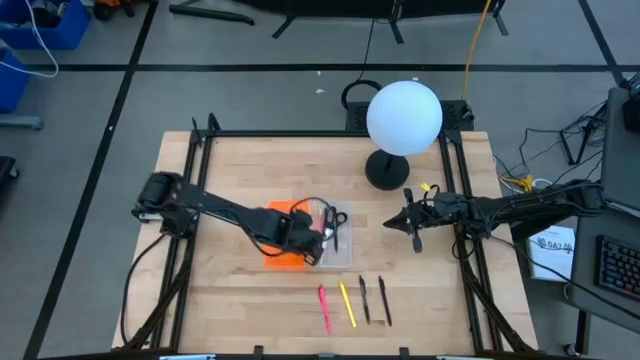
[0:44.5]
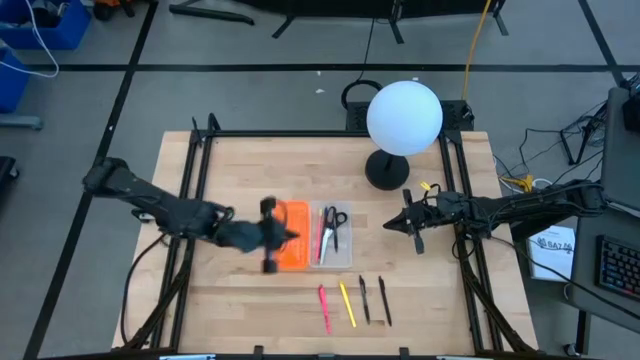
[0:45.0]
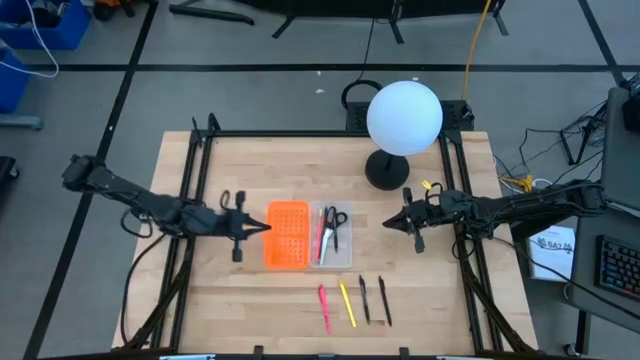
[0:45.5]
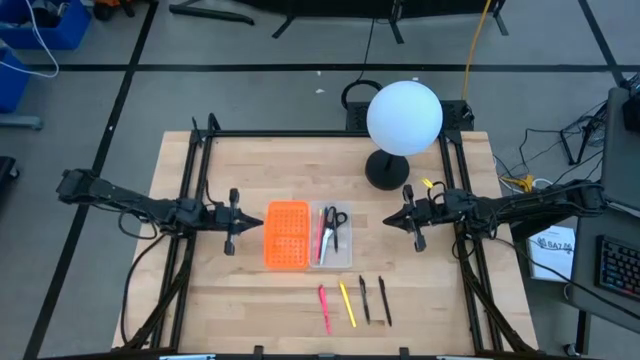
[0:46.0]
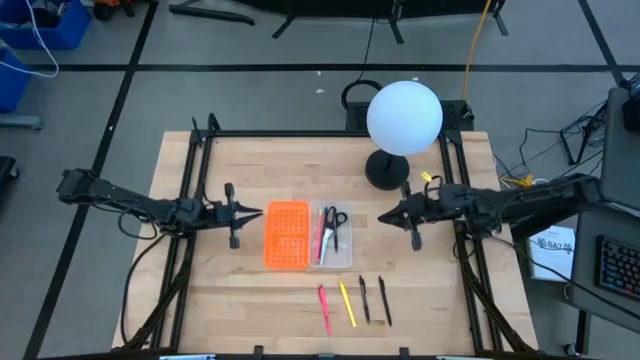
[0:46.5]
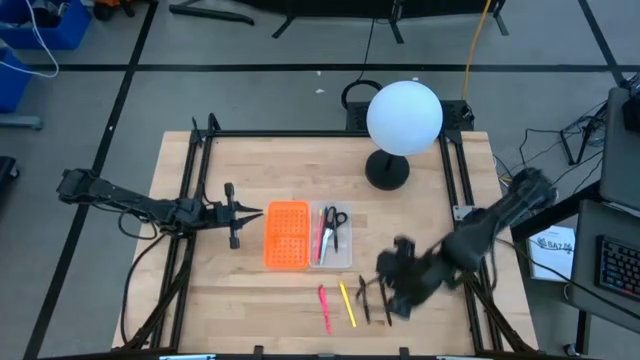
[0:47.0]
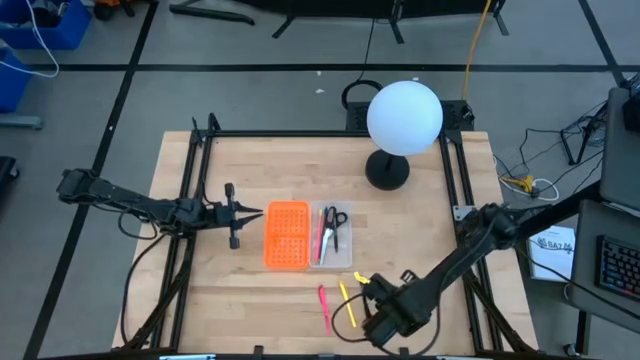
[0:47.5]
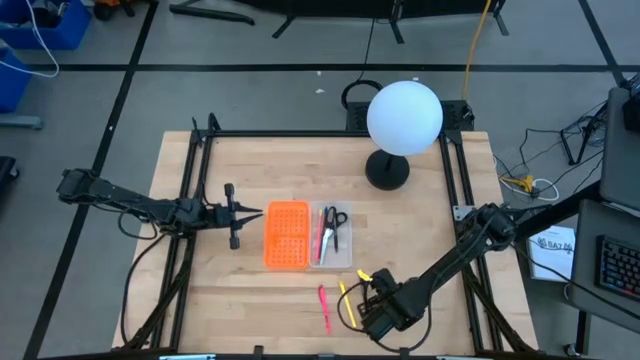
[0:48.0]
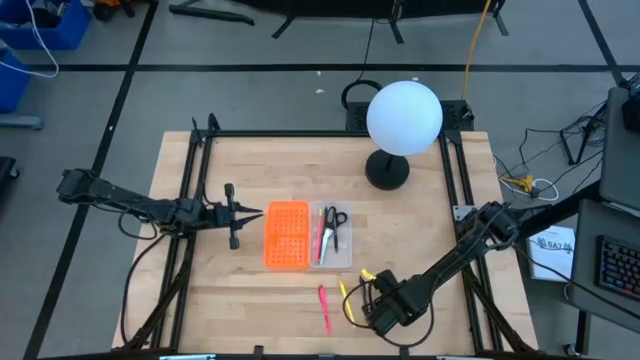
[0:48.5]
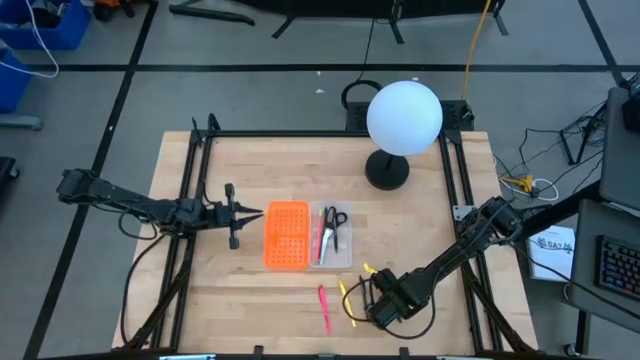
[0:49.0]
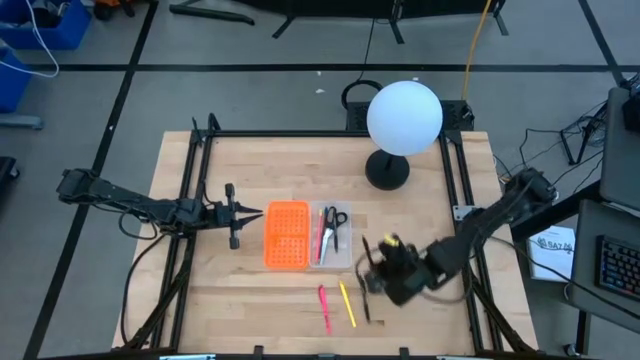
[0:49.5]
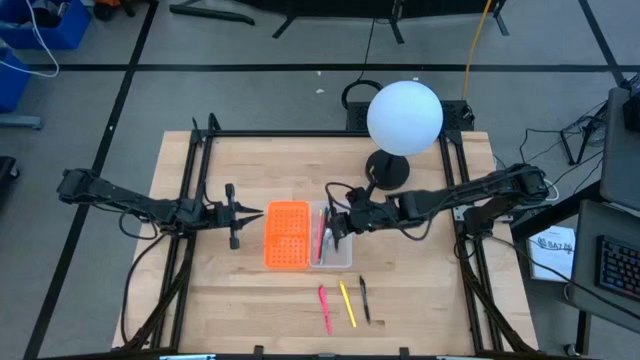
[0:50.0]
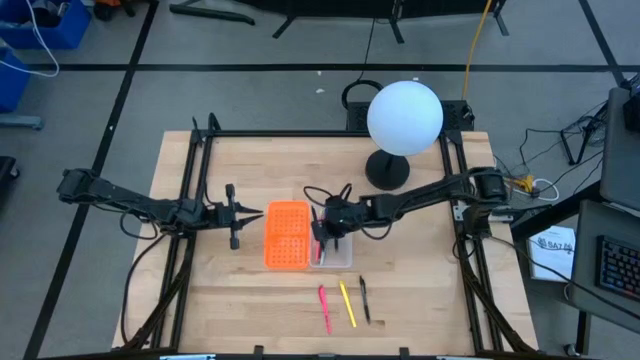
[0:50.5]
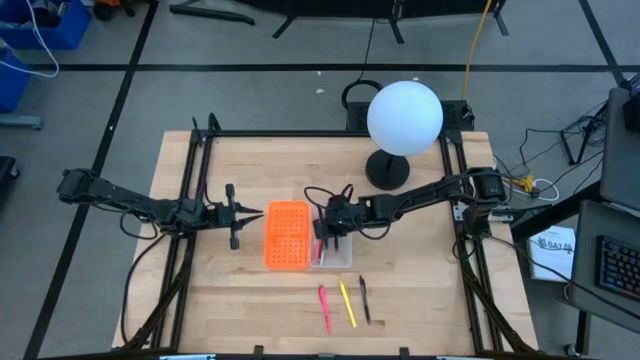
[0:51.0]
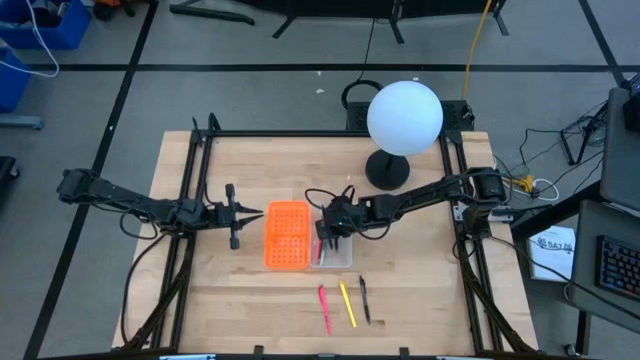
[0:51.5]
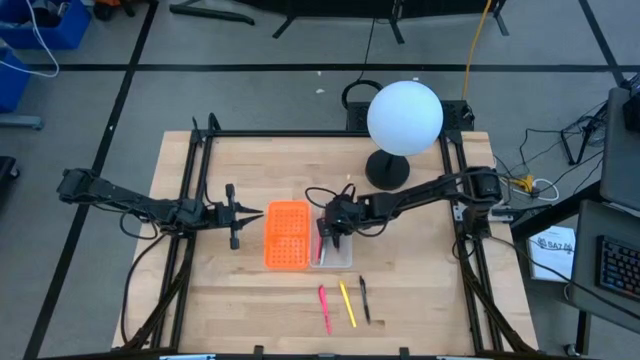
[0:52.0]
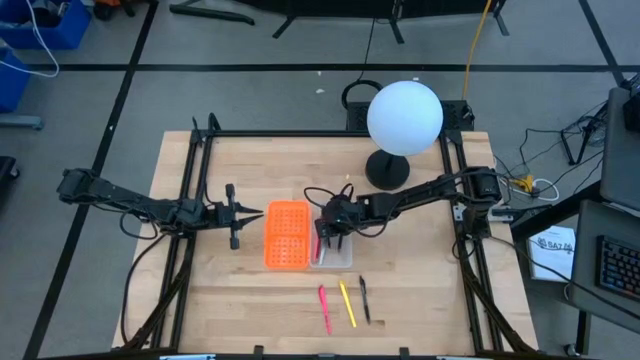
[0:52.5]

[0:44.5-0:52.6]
Task: Pick & place school supplies into a supply box
Put the black pen into the orange supply box

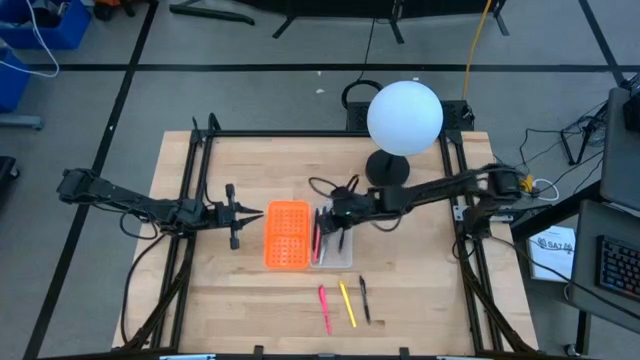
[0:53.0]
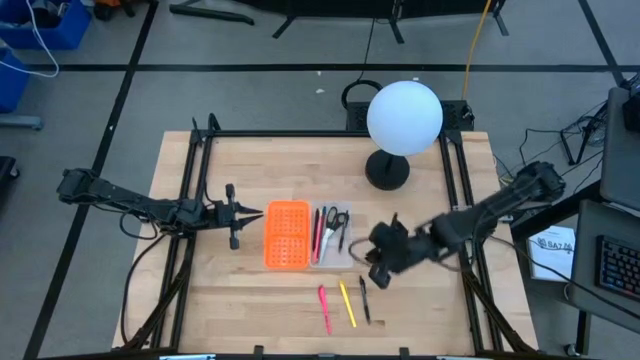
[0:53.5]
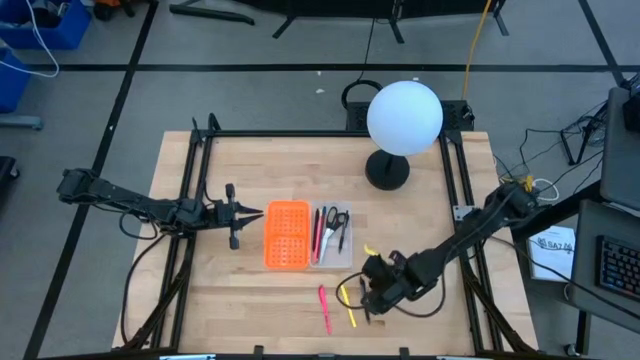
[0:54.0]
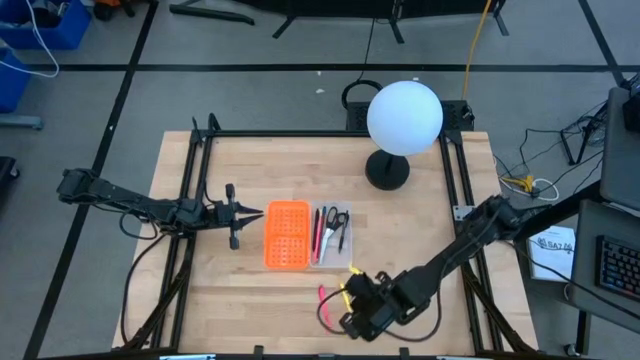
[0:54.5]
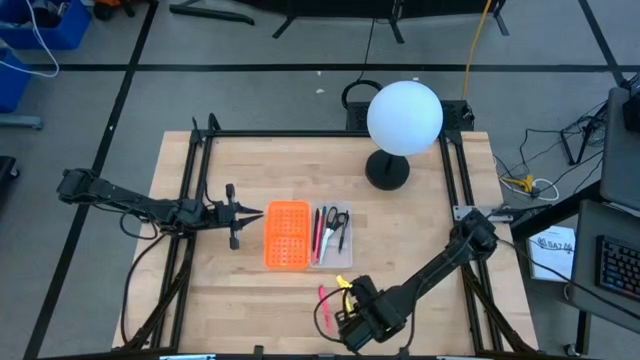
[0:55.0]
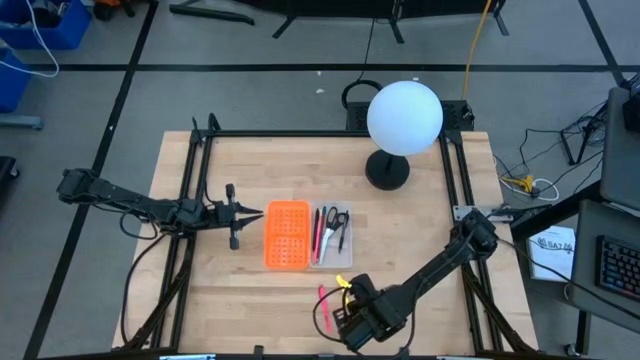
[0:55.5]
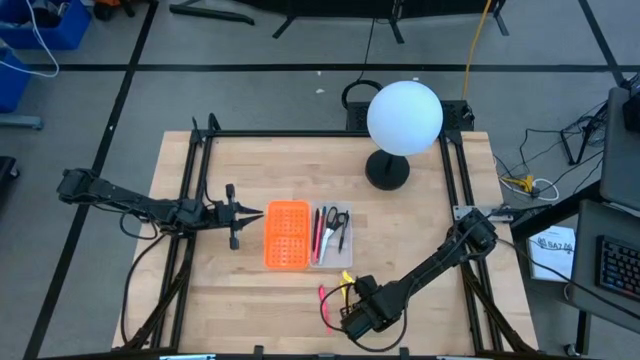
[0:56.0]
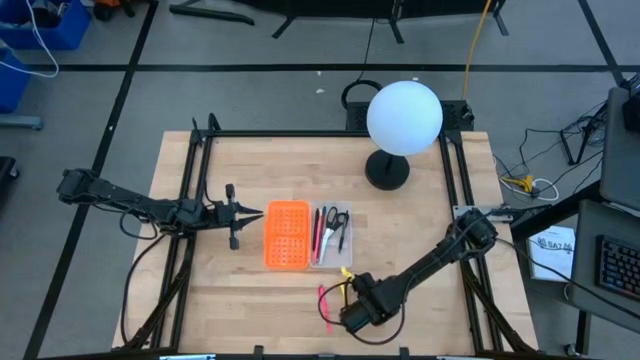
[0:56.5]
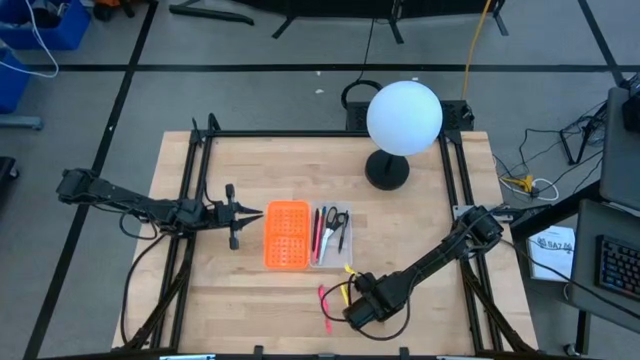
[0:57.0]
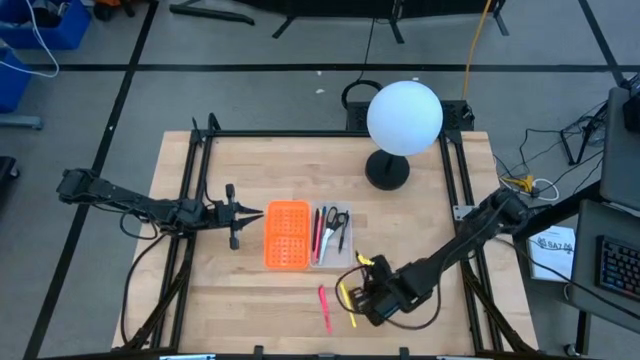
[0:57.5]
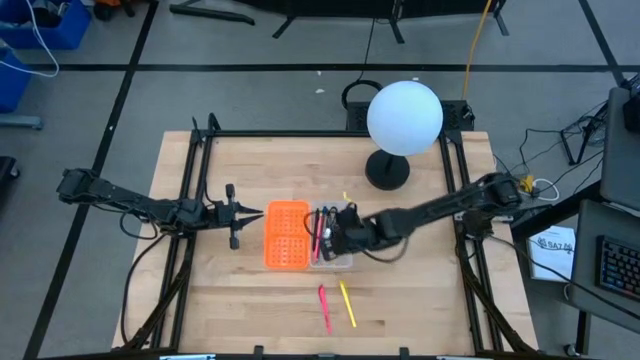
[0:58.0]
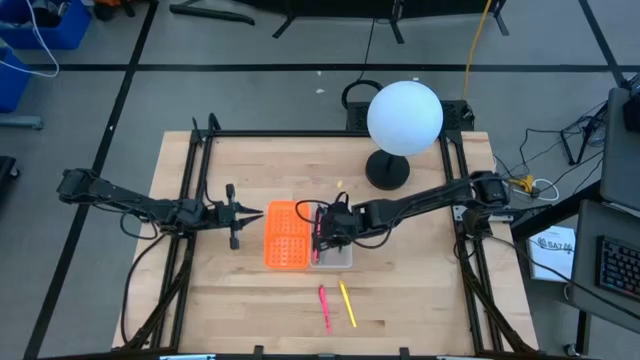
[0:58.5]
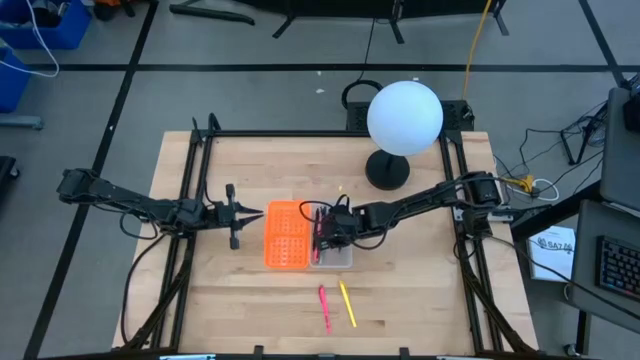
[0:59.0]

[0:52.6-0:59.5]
Put the black pen into the orange supply box

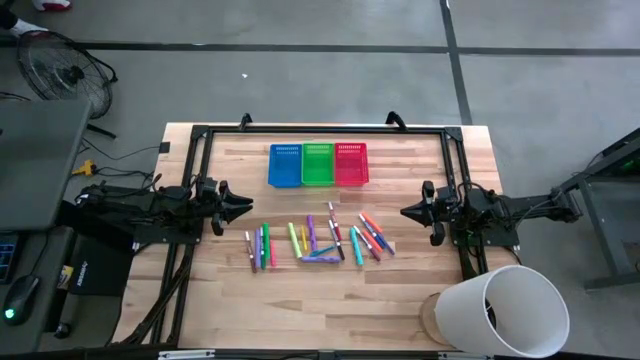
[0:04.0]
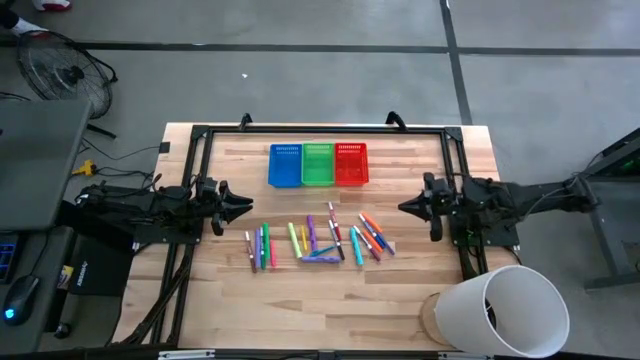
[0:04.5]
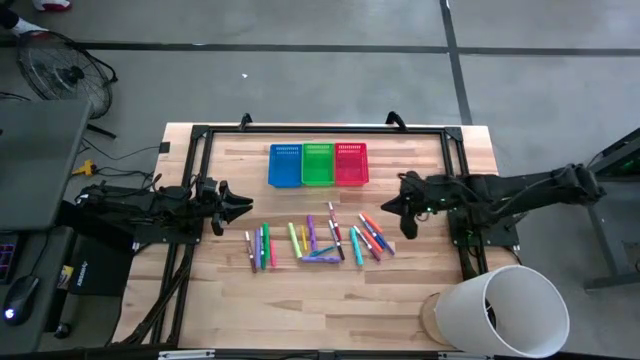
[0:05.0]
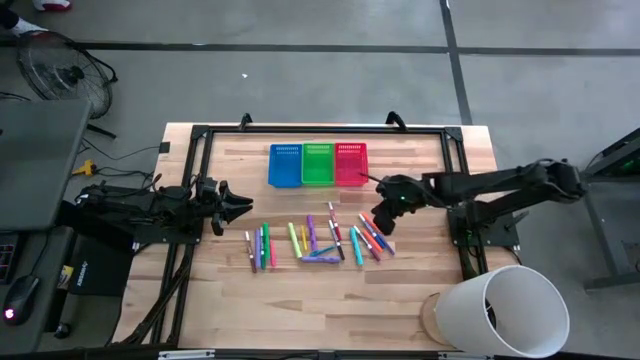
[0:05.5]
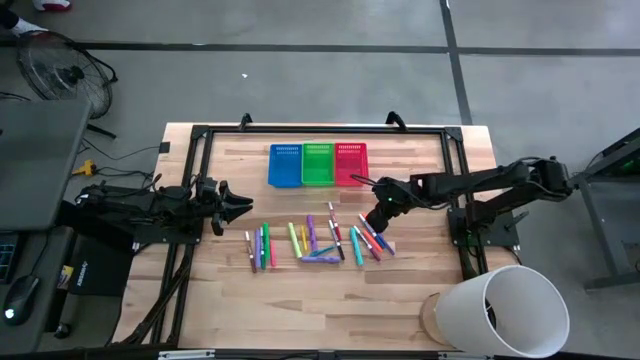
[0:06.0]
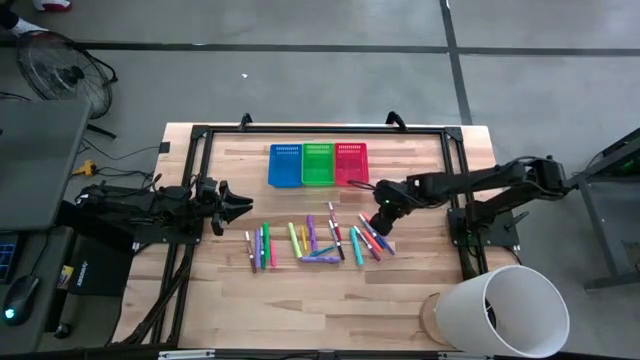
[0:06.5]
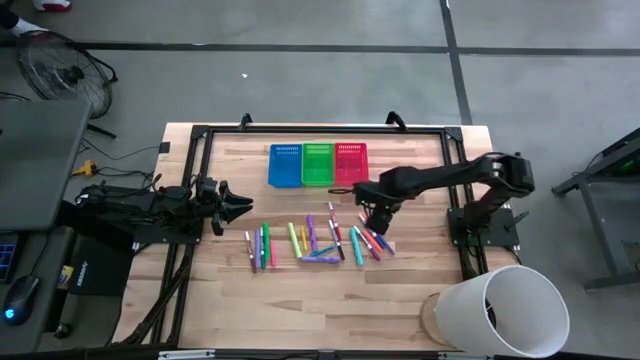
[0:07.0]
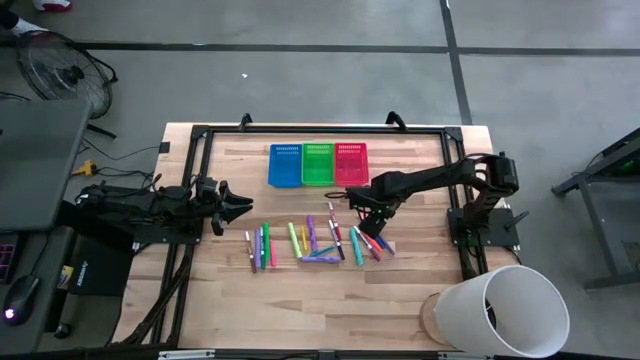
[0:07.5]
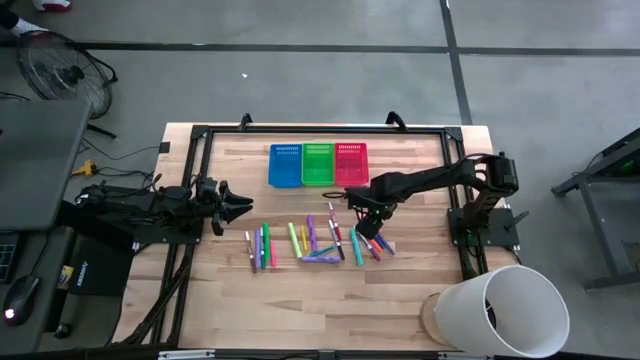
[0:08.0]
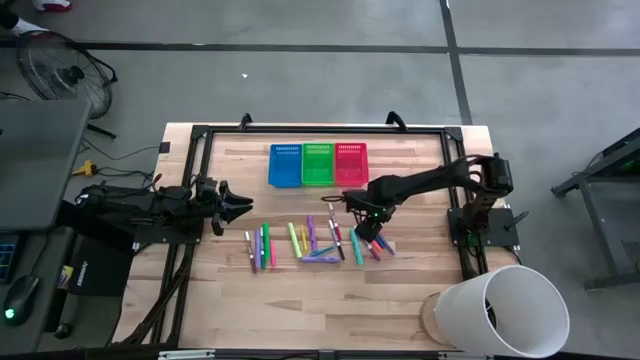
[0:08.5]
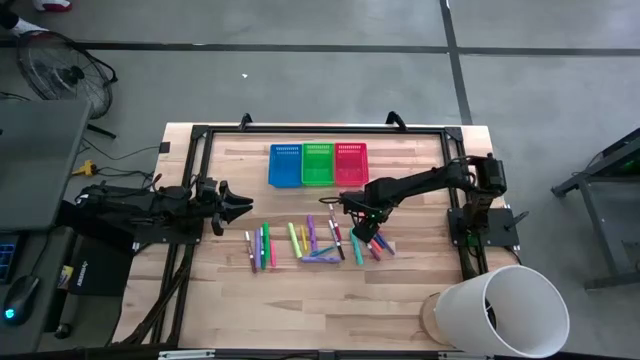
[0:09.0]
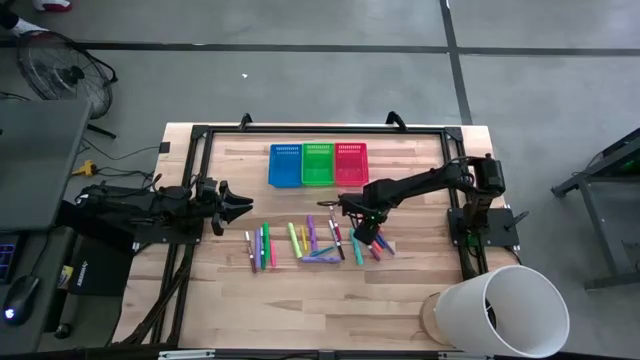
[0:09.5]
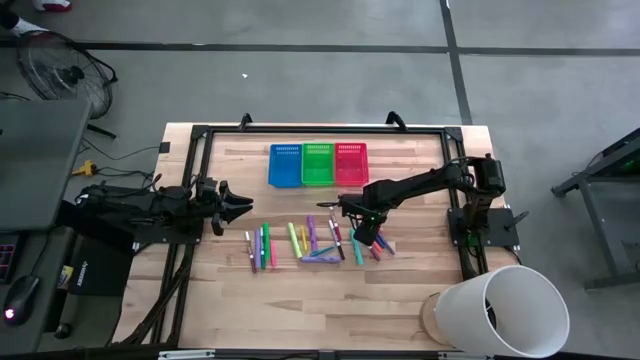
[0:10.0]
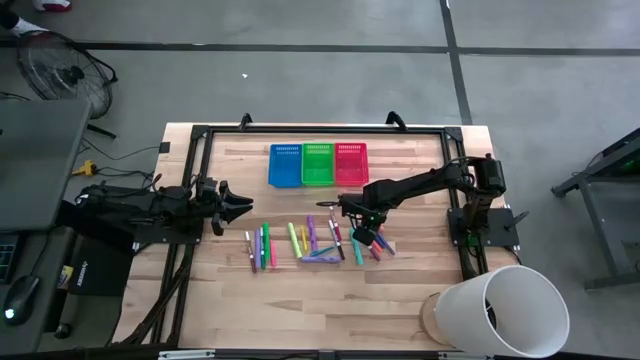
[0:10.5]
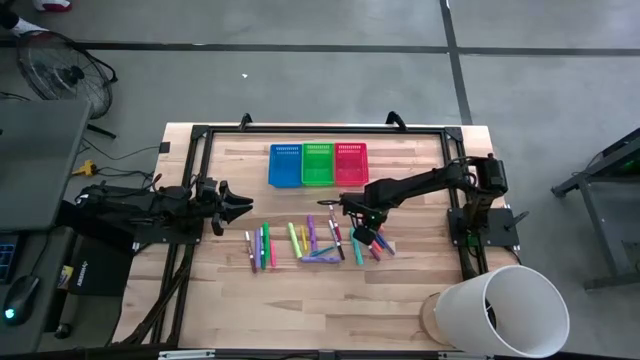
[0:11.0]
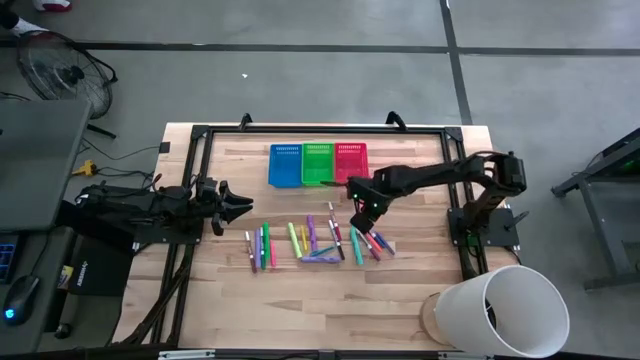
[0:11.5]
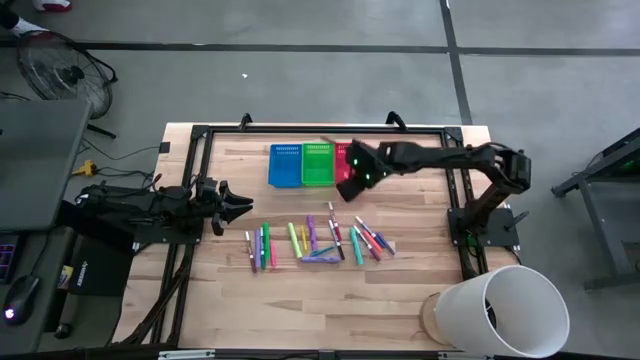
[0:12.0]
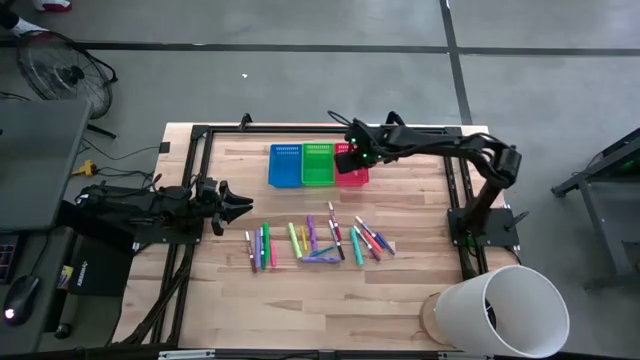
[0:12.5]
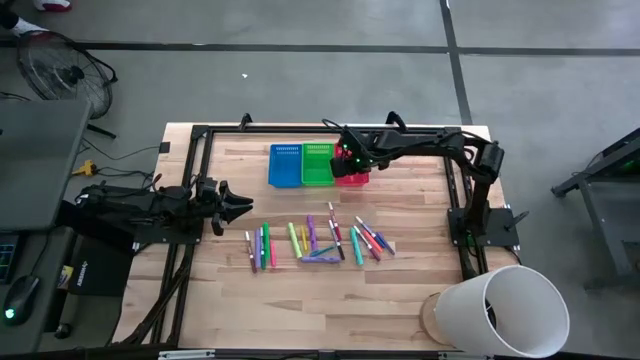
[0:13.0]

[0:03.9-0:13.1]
Task: Pick & Place Markers
Put the orange highlighter pen into the red bin
